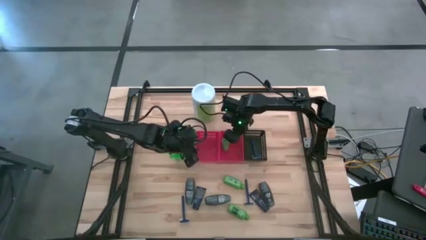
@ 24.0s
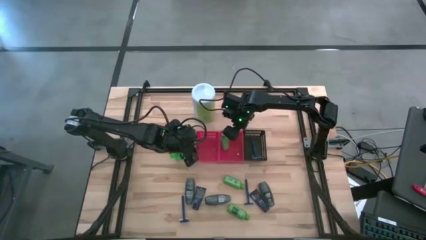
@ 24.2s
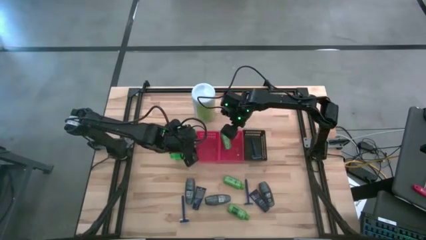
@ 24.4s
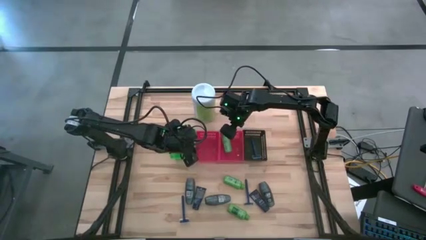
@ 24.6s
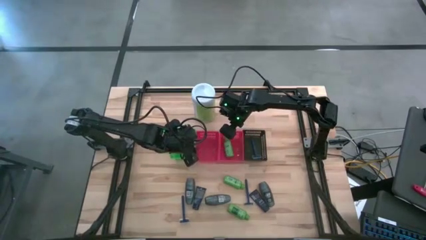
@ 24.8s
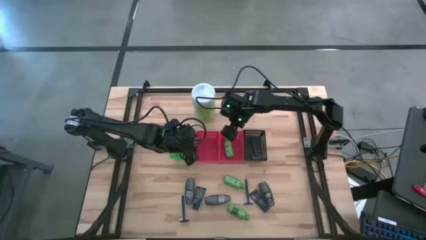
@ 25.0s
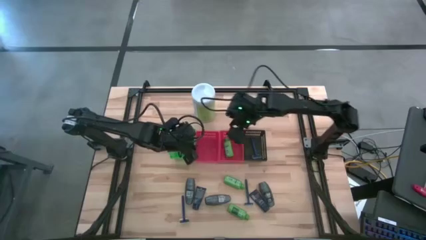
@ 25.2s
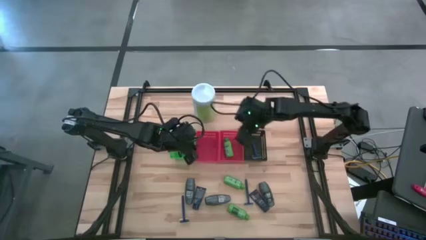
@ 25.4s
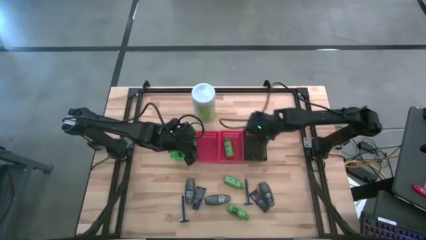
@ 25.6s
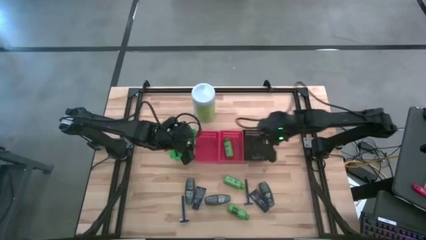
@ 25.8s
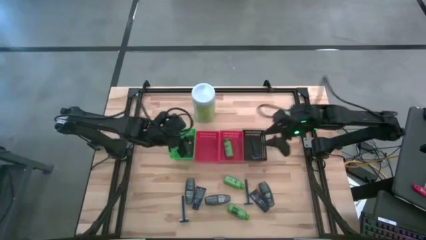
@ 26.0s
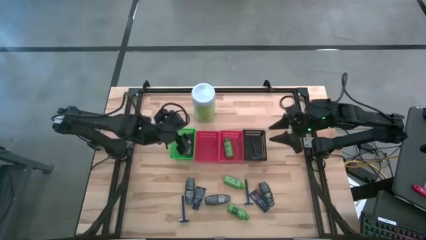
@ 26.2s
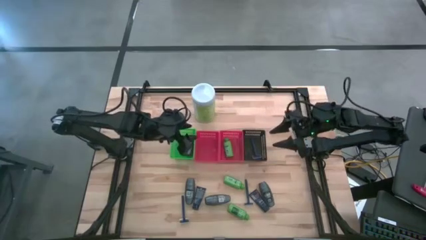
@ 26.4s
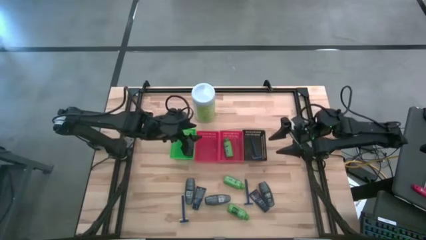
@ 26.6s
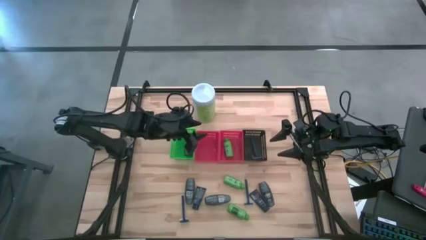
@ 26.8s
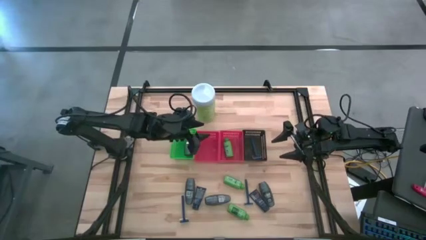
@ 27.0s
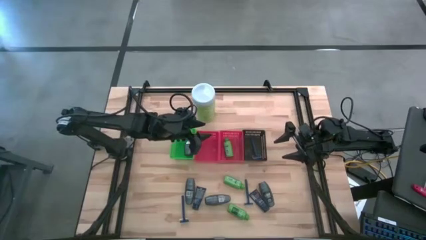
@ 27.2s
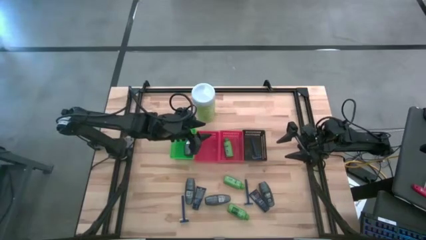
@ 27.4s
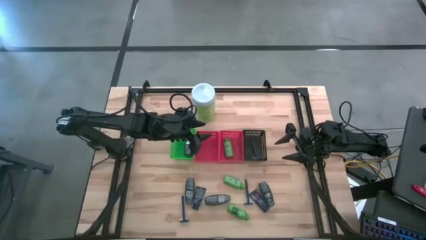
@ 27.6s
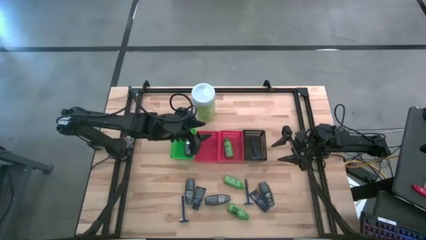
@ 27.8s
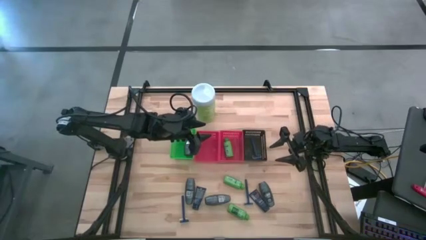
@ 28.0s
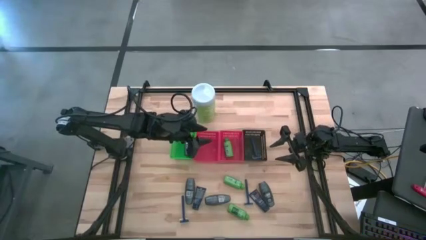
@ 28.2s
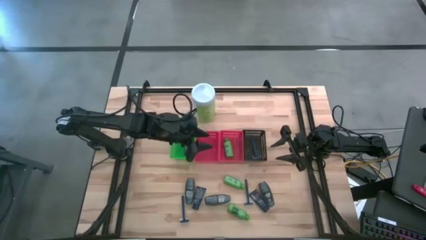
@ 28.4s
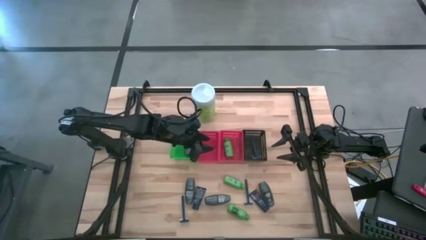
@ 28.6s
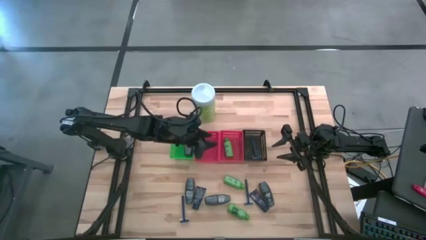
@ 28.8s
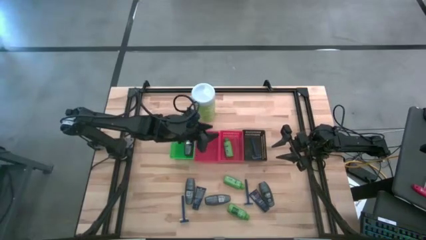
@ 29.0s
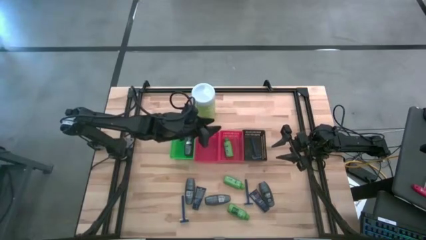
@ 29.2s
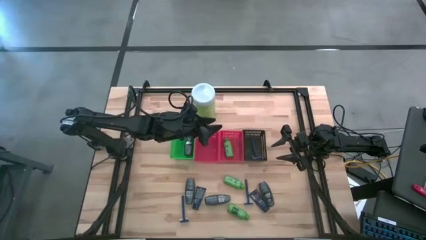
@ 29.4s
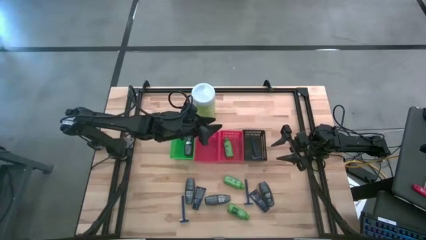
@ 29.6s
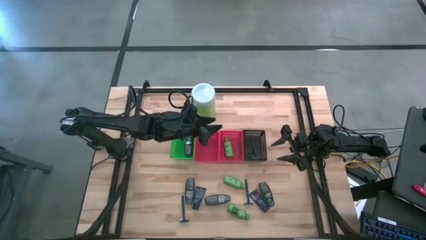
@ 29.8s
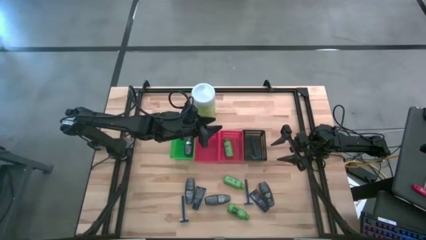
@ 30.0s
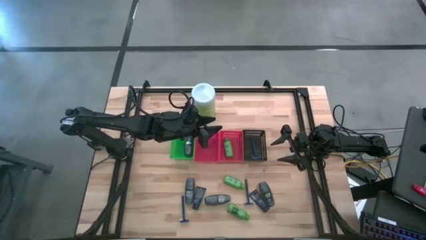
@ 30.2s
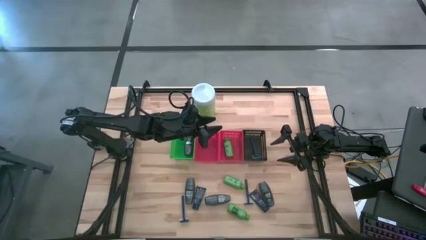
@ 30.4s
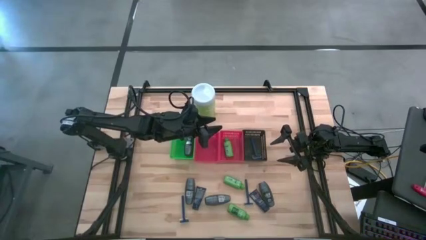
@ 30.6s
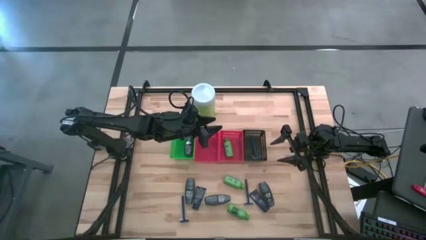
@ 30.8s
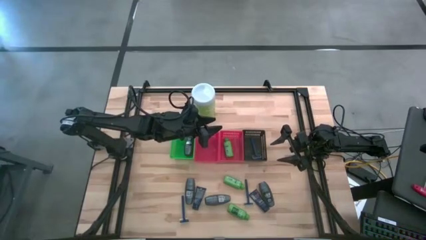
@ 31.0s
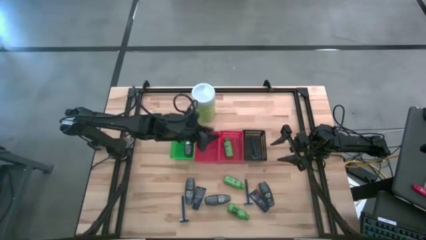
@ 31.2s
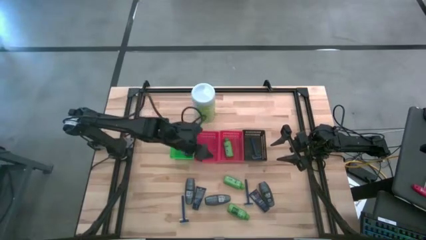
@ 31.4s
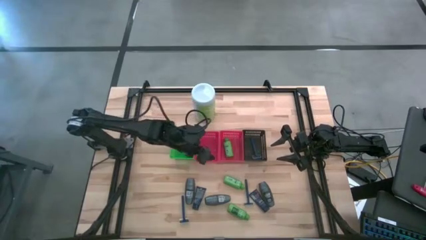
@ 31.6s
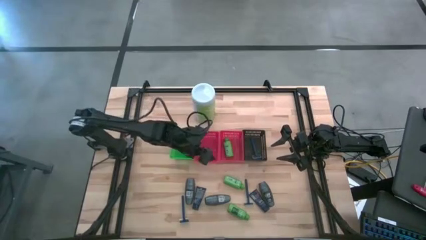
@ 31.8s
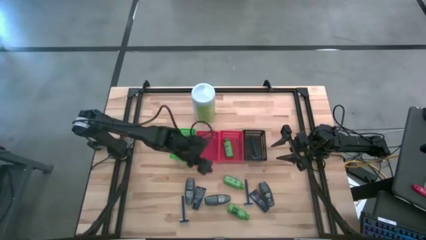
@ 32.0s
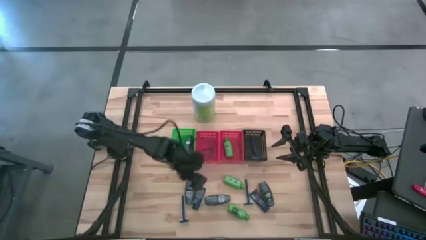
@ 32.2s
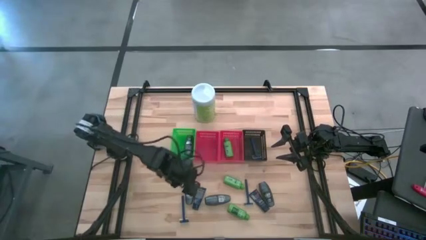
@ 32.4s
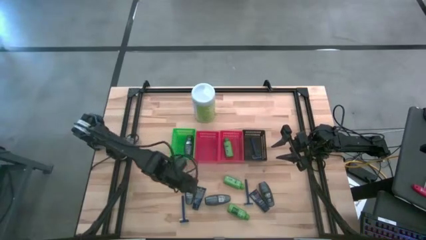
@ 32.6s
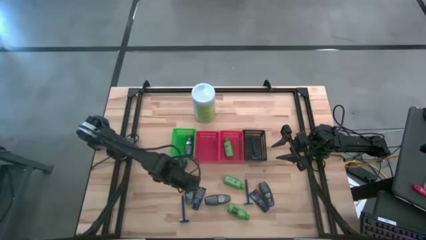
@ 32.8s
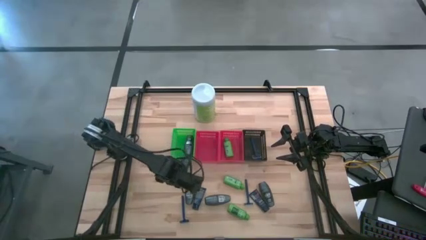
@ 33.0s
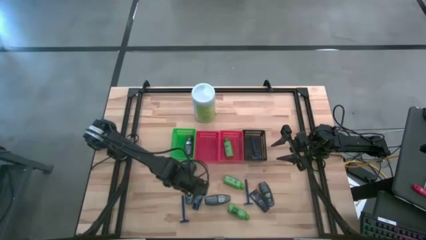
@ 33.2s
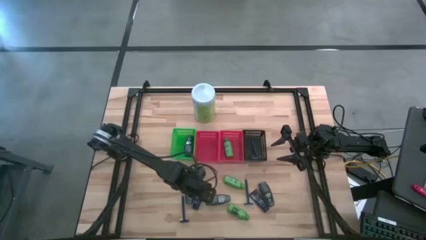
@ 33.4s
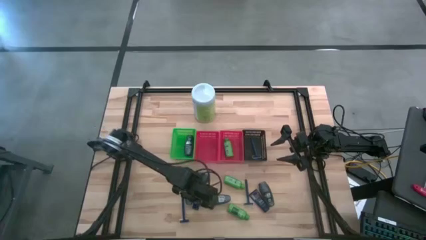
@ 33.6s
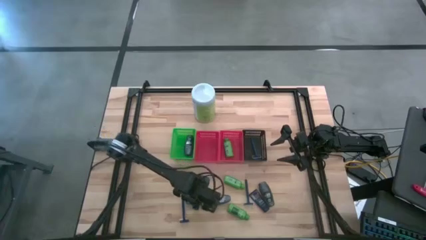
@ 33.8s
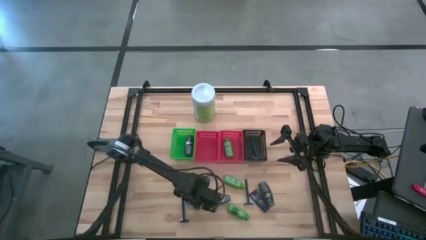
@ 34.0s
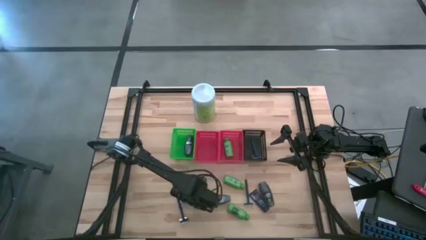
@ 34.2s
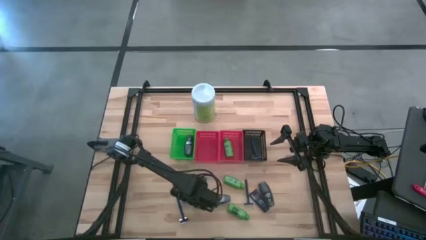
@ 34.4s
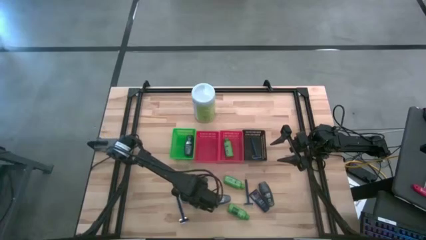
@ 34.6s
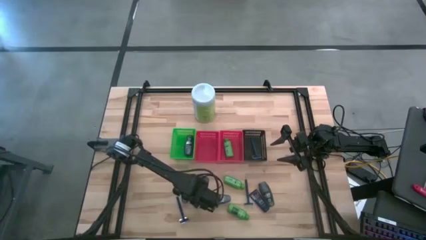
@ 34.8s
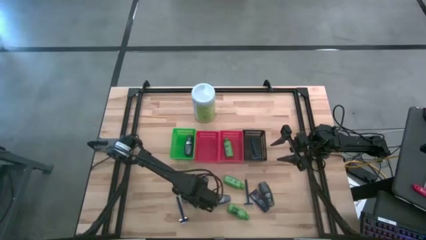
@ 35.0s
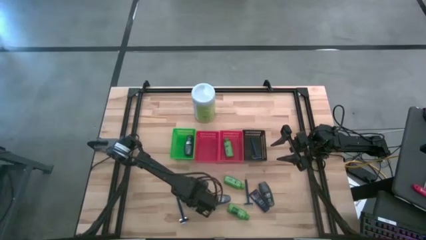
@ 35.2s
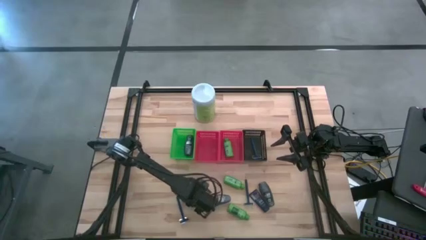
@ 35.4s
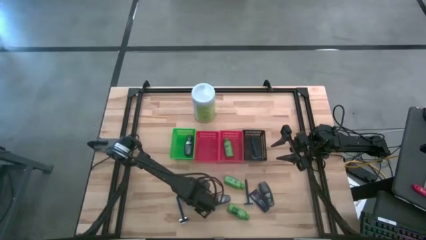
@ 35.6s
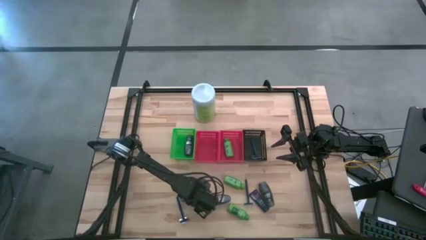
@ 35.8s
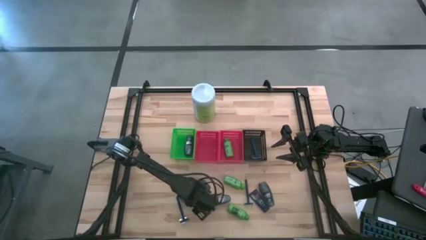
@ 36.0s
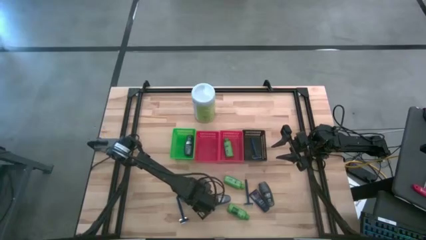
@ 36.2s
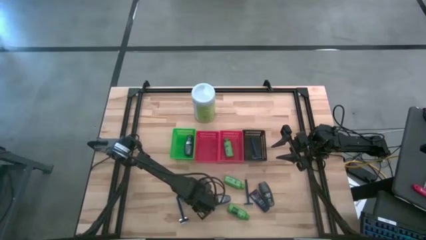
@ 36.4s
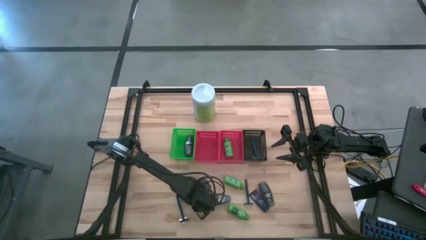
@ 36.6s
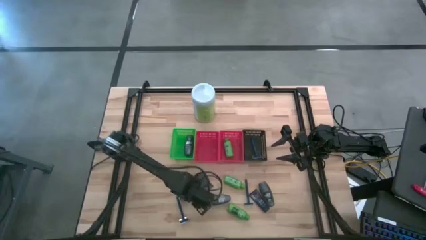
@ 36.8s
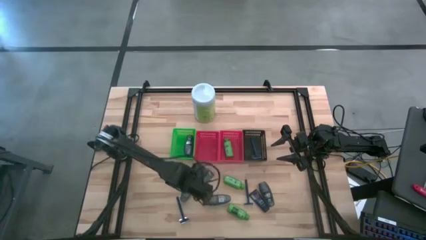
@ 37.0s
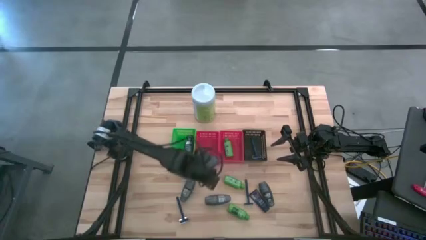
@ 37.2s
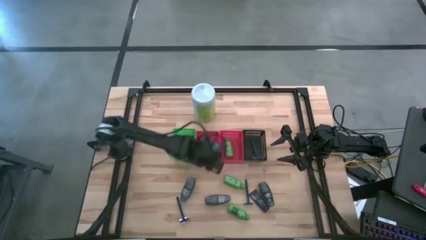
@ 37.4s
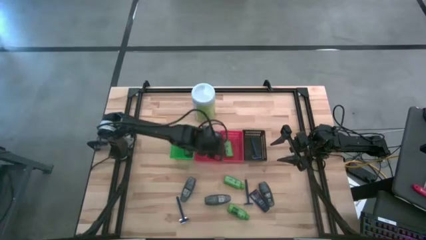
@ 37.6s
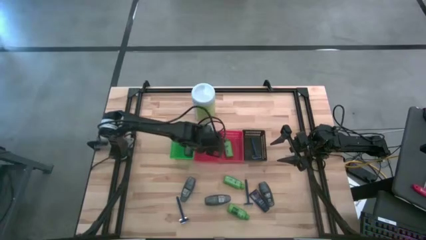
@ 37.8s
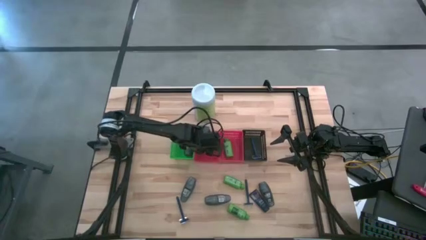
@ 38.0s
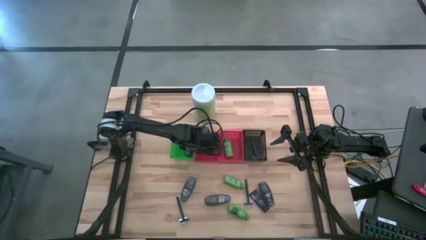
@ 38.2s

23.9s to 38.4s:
Task: Pick & Place Travel size toiletries
Put the dark blue shaving cream in the left red bin

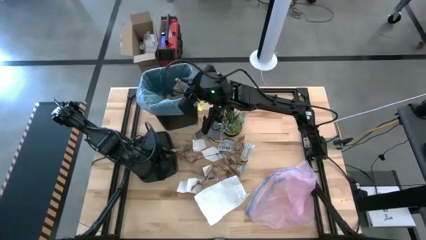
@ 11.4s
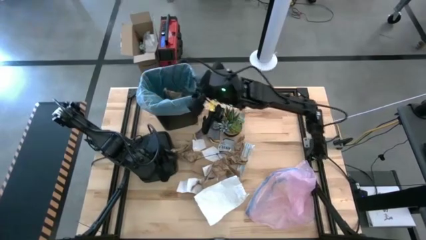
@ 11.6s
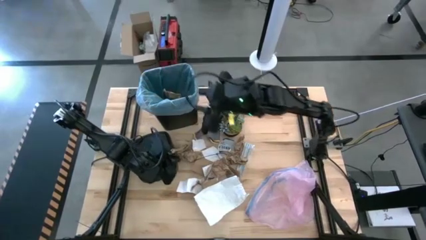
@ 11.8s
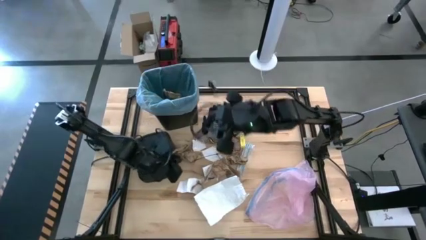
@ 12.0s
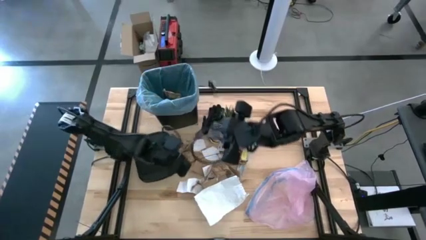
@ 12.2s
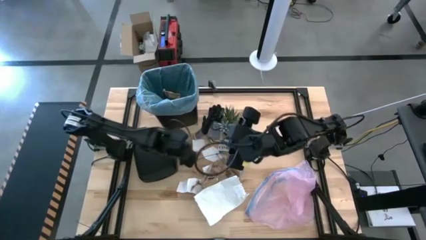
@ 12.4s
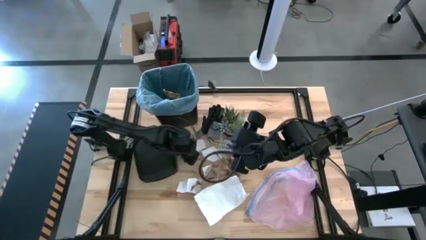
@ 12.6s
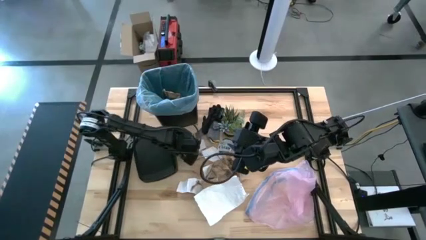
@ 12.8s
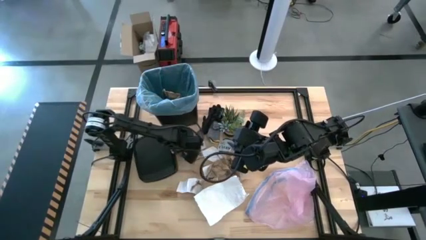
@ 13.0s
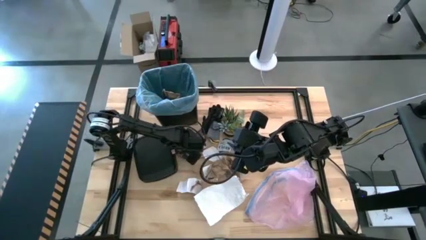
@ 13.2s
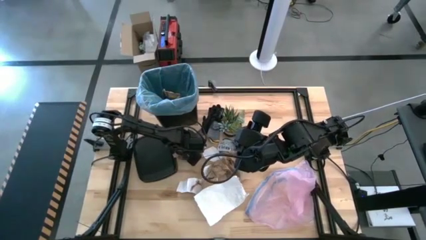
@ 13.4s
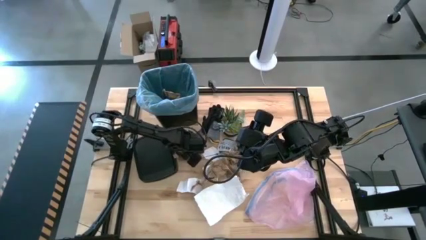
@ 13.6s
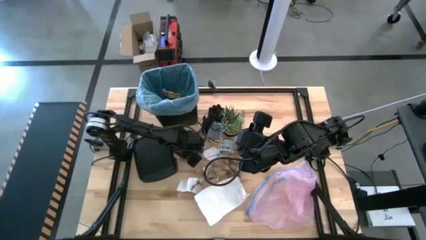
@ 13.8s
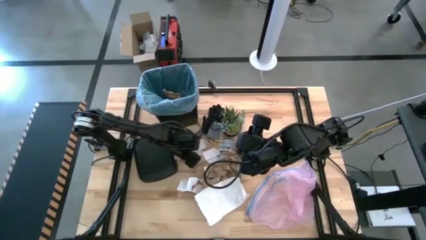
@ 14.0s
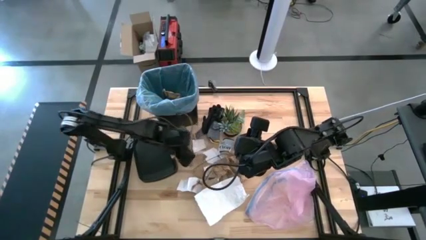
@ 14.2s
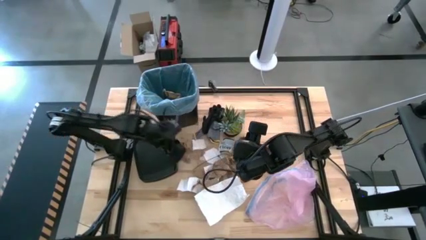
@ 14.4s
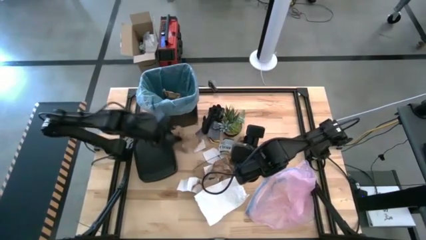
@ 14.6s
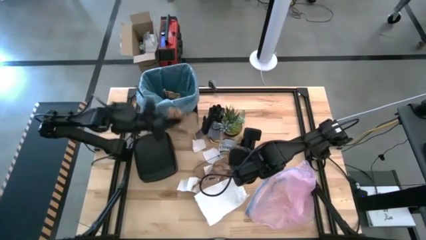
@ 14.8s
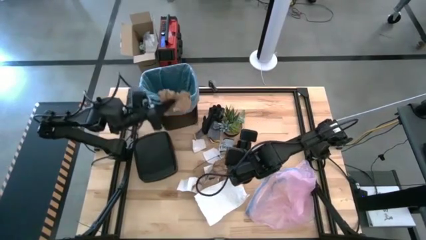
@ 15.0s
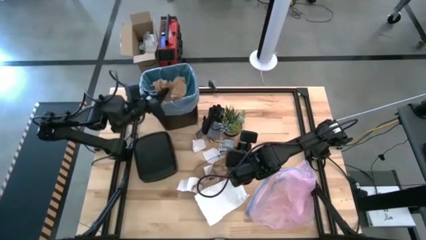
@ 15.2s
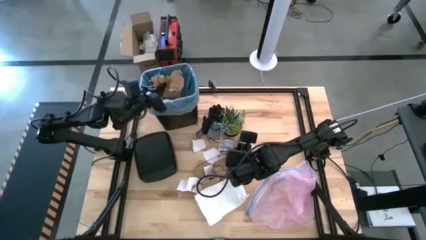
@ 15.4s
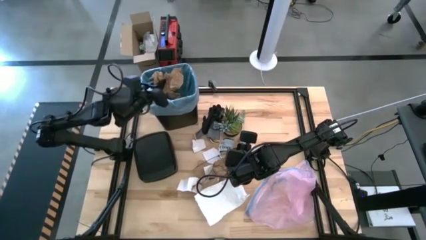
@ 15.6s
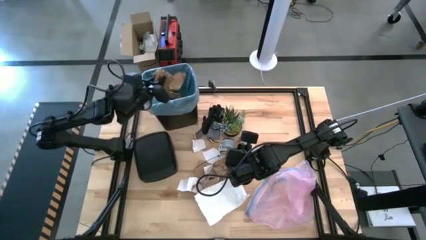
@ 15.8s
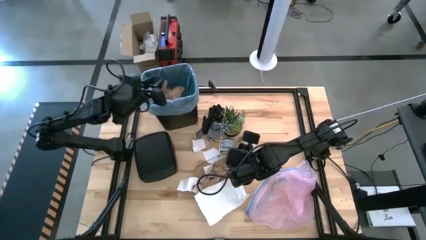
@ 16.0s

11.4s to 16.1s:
Task: place trash/remove bag and relplace
Put the brown napkin into the trash bin
